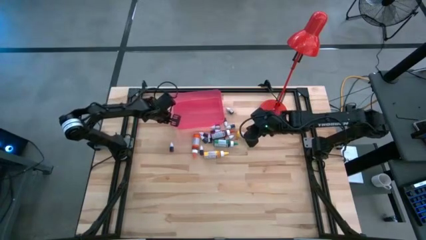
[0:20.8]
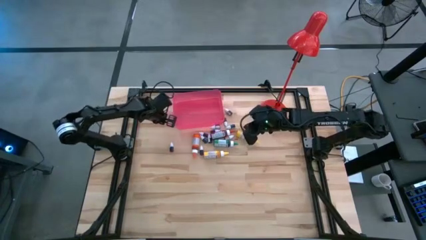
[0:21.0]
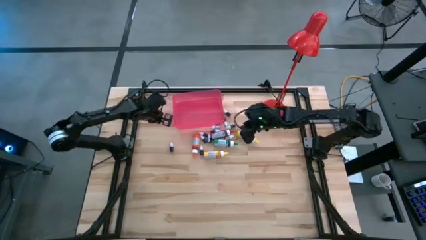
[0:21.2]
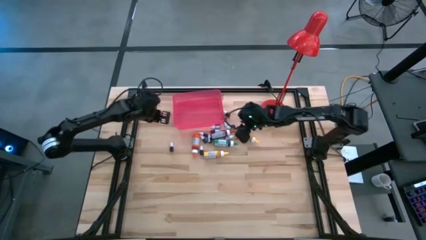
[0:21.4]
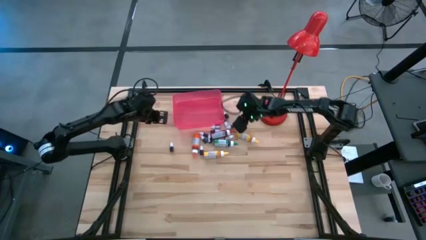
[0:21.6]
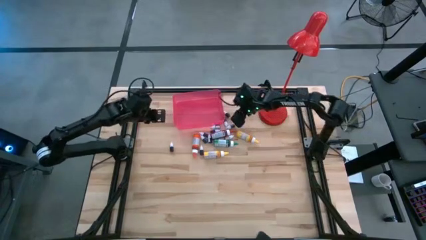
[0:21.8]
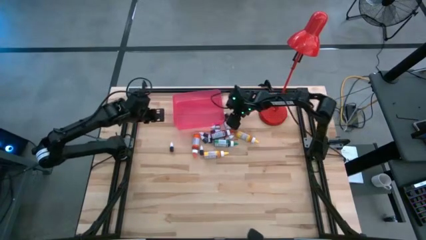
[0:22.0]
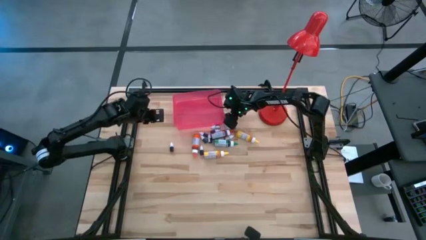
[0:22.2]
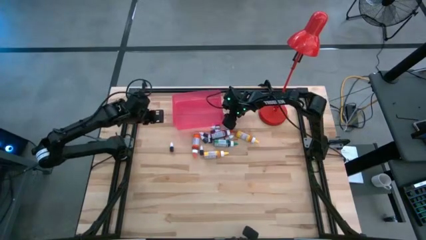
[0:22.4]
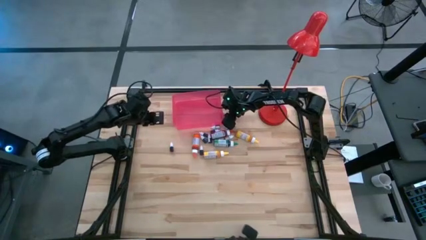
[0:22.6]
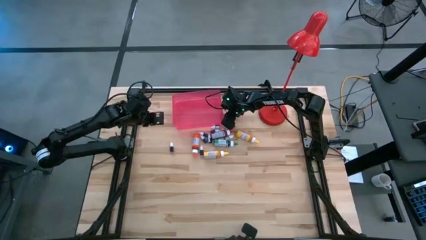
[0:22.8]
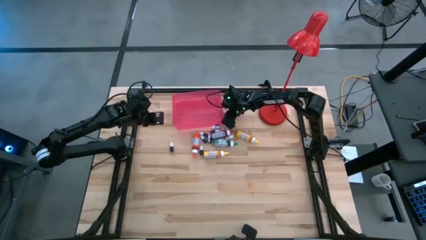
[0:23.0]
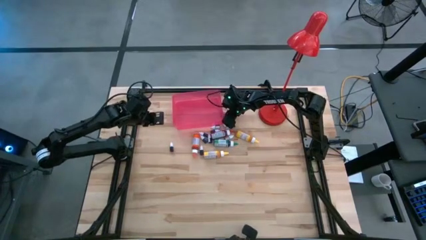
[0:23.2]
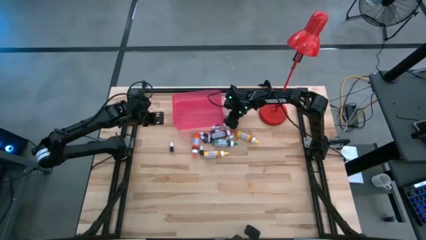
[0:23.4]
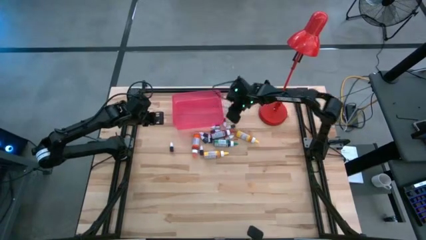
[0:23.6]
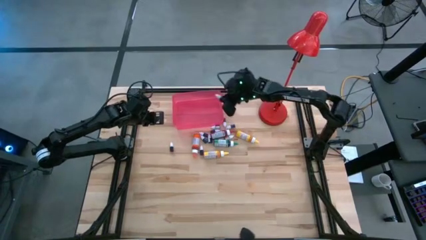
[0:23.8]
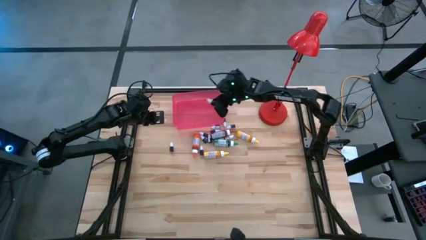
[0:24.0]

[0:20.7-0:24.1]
Task: Pick & Place food coloring
Put the small black food coloring bottle into the red bin

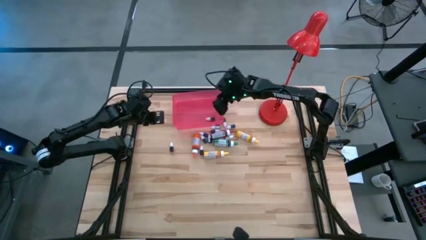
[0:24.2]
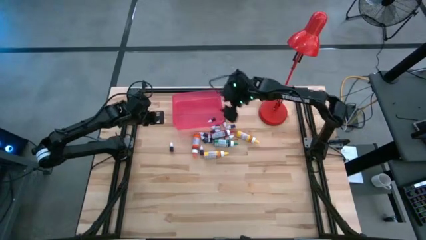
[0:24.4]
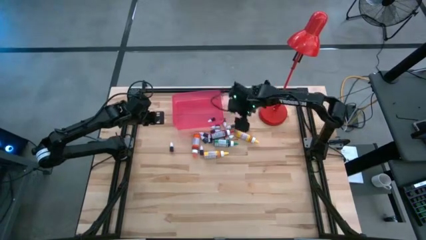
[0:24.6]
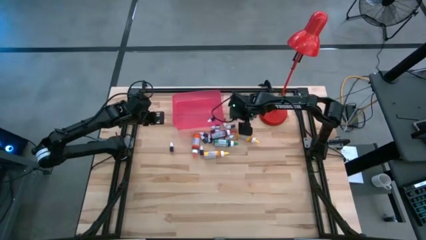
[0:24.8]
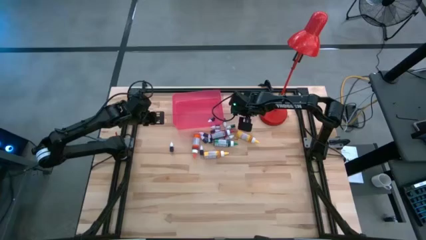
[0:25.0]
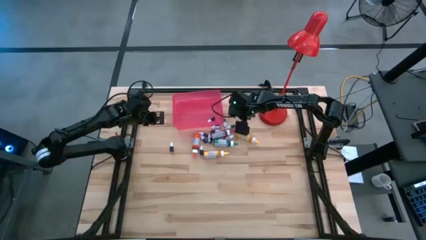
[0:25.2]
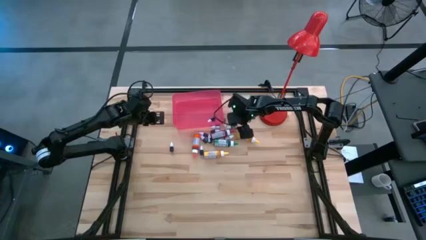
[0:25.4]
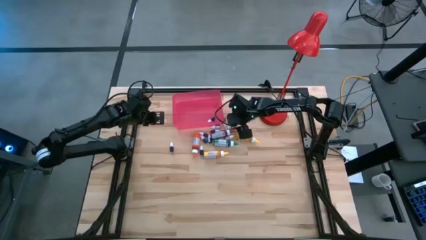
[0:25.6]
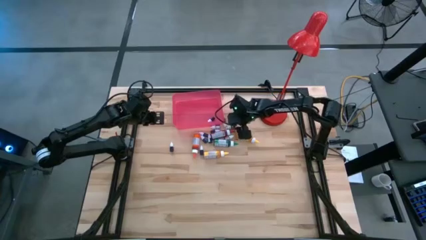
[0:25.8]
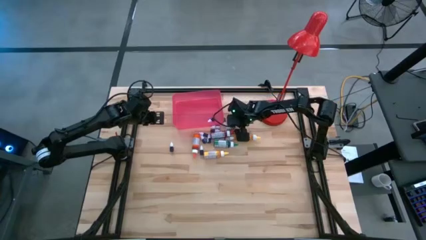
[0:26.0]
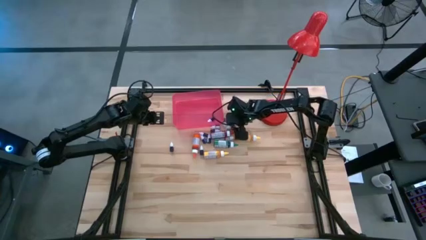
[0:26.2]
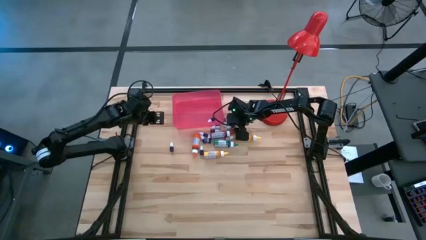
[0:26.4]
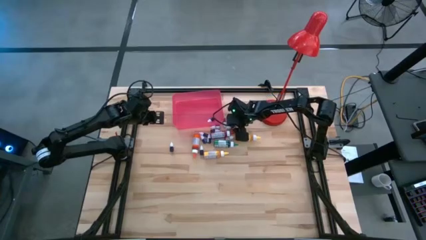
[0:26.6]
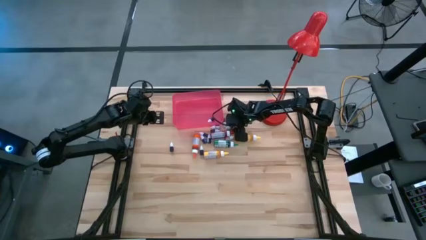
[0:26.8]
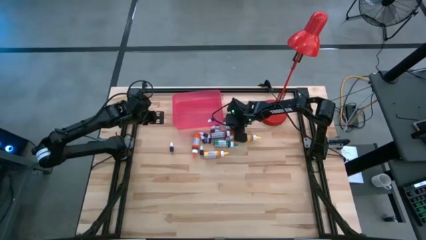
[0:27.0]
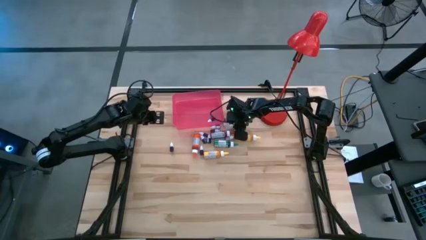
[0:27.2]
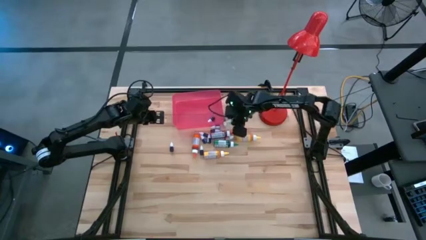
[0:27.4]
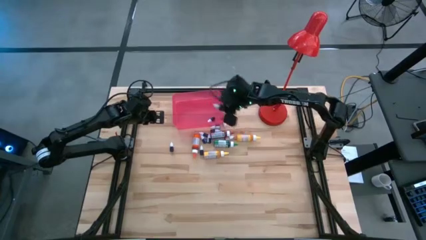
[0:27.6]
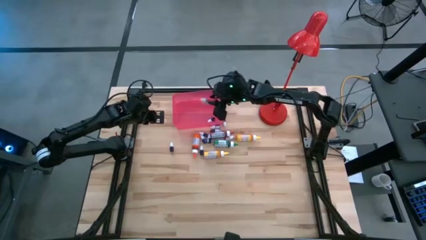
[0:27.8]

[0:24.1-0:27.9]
Put the small black food coloring bottle into the red bin

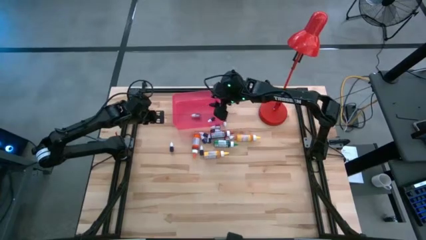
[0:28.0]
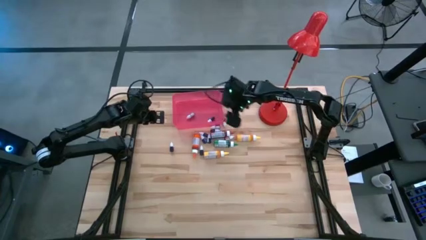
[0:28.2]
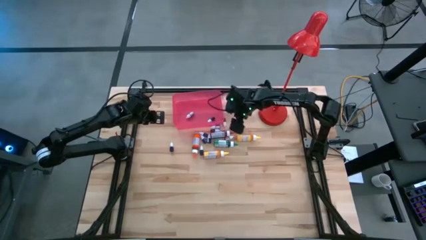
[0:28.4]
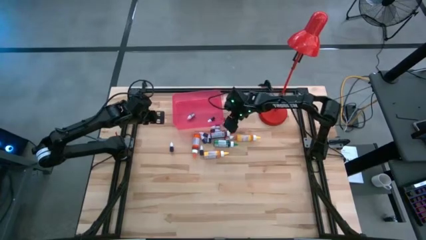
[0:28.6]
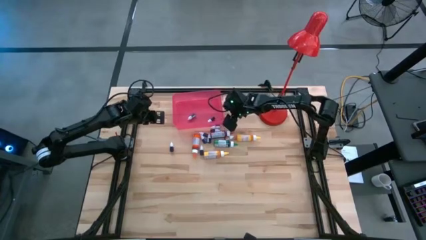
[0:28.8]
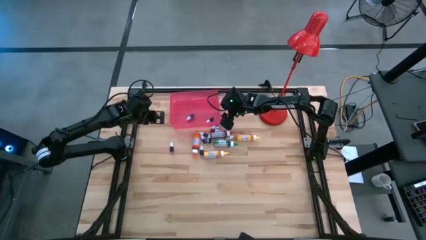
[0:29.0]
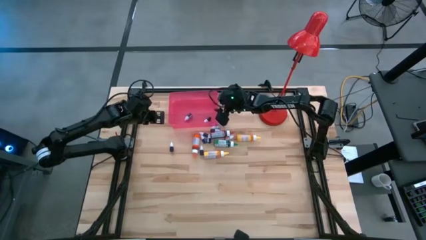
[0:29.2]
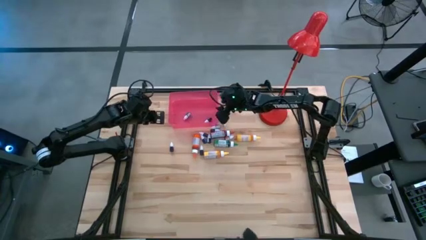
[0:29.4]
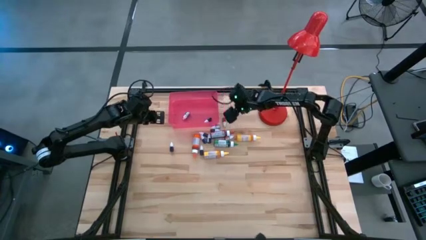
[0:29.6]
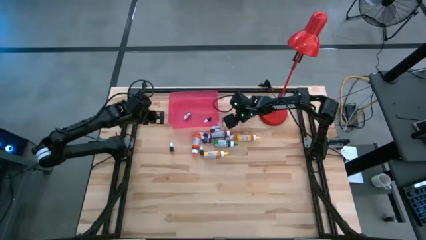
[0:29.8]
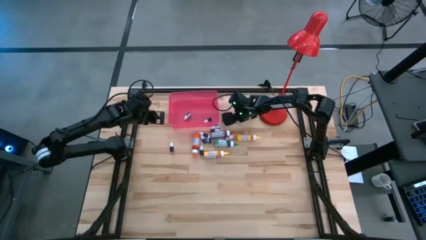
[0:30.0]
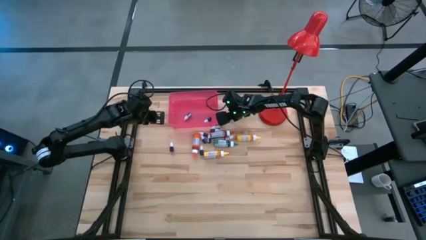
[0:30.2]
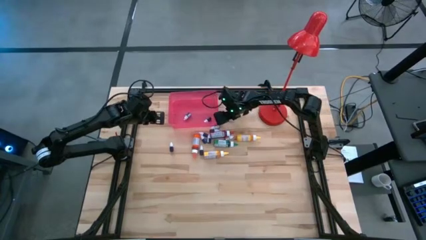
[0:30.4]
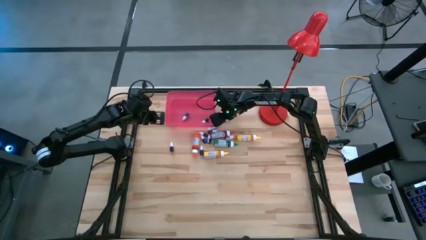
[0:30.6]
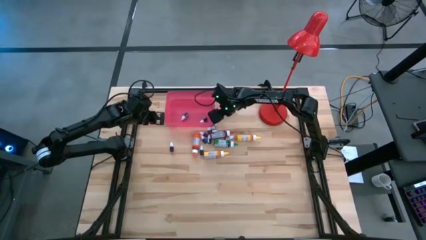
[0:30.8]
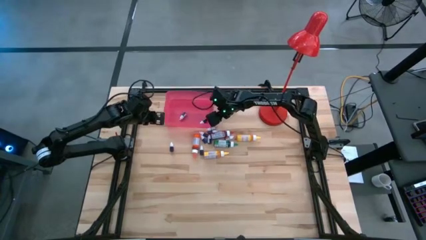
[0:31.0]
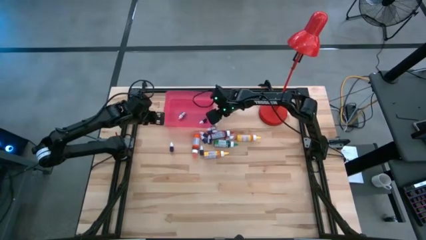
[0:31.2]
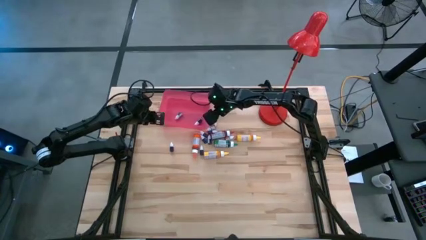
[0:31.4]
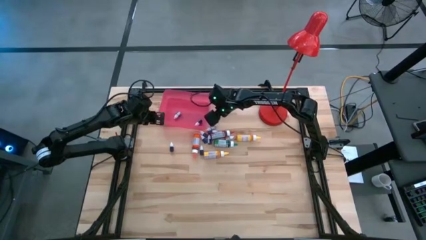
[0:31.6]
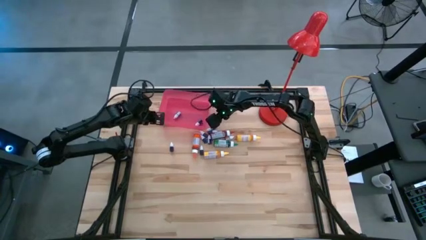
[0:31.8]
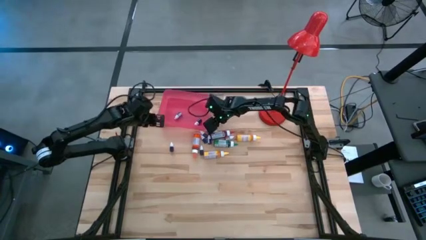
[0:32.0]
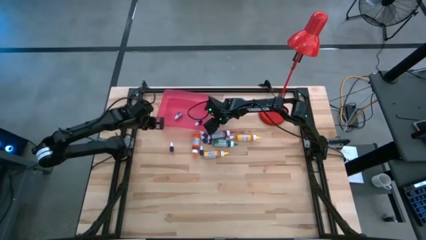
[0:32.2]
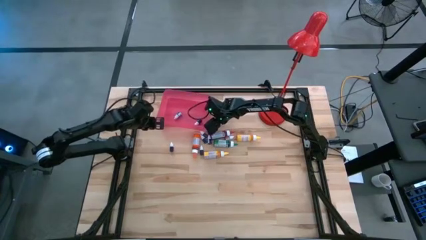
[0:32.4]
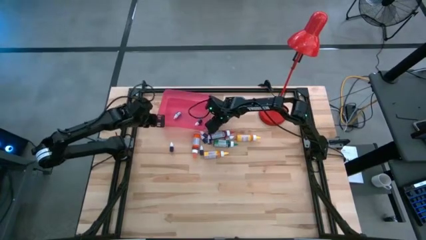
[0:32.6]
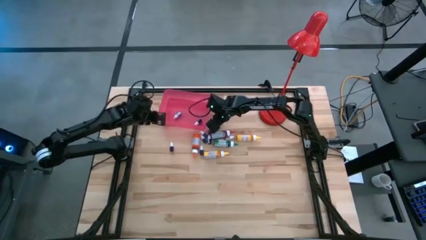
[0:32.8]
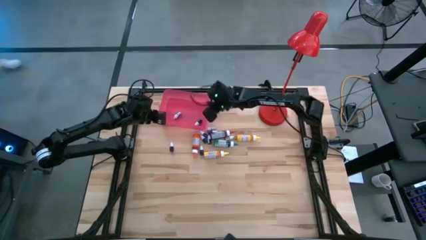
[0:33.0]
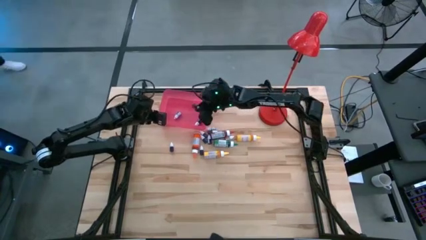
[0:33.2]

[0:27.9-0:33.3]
Put the small red food coloring bottle into the red bin

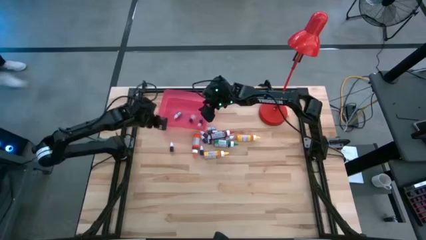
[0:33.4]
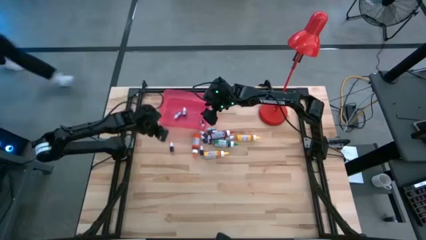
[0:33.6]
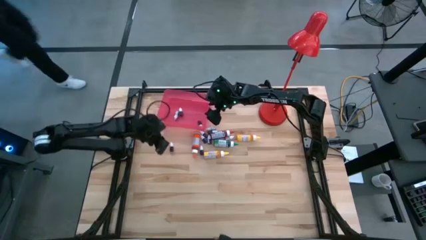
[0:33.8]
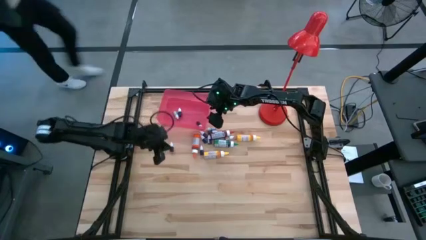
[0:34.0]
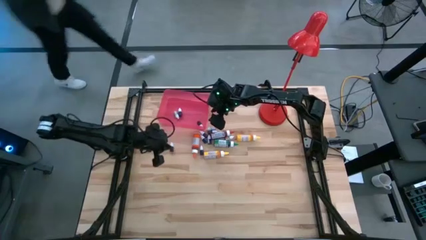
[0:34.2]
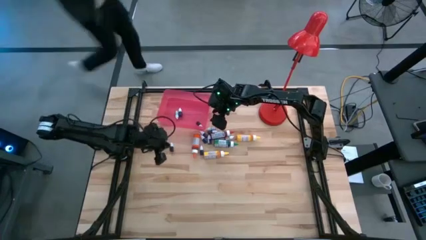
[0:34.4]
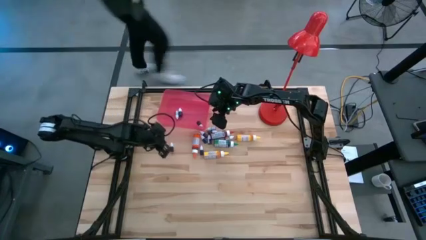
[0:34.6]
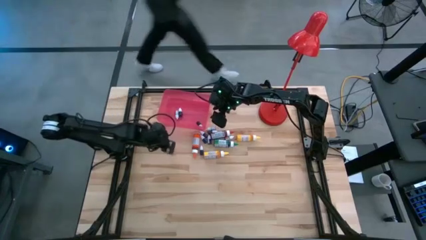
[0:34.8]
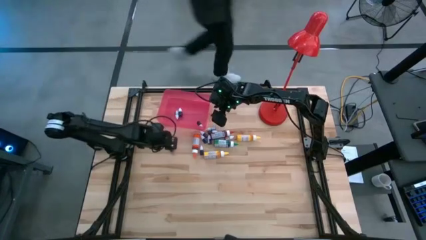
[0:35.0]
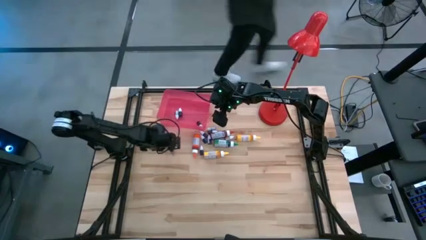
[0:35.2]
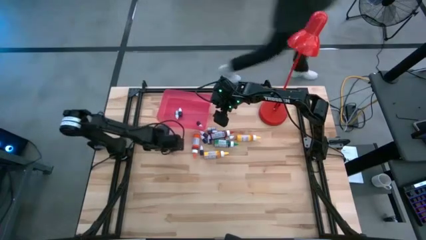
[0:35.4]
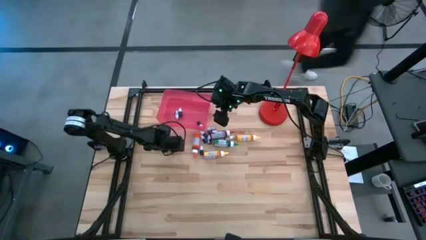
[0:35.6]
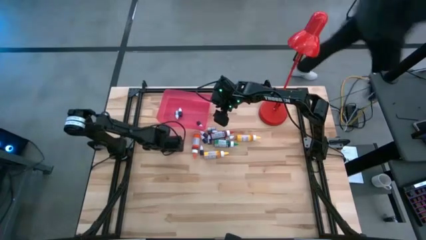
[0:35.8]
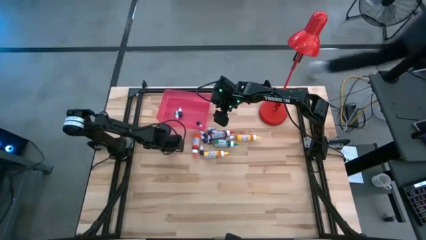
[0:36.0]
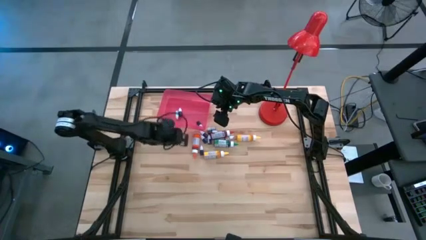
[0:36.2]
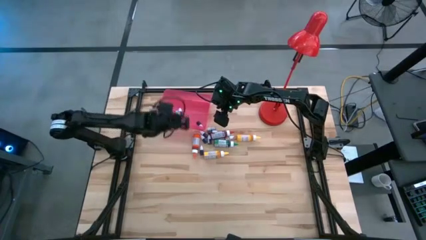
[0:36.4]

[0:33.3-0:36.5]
Put the small red food coloring bottle into the red bin
